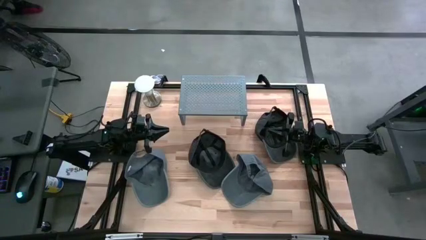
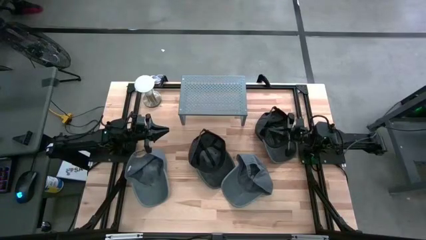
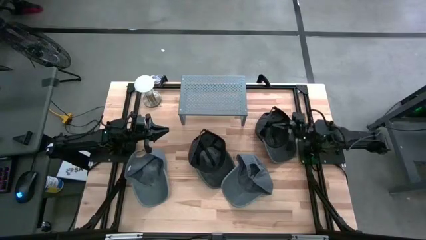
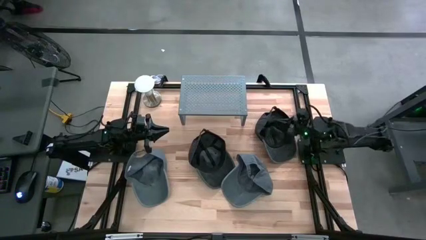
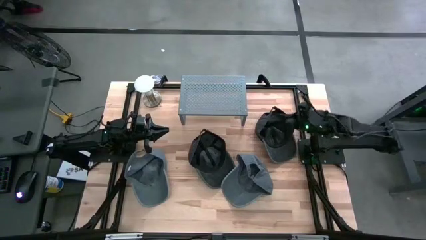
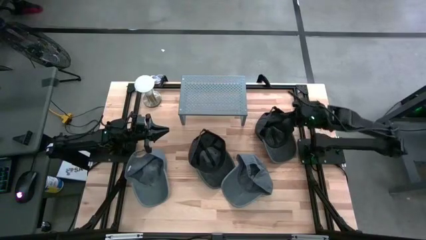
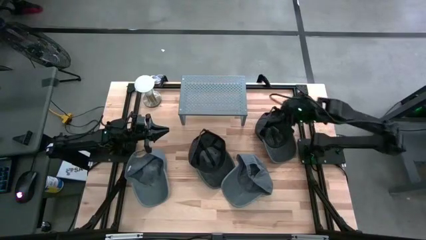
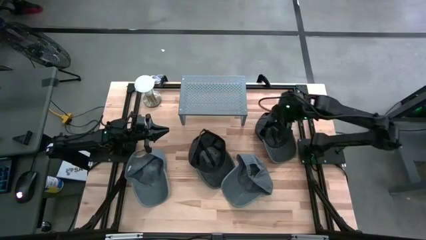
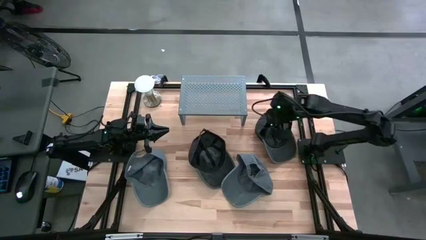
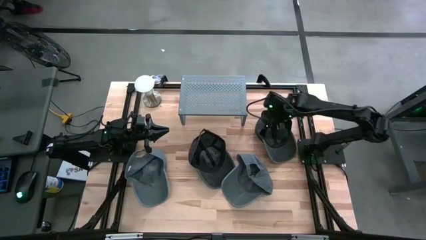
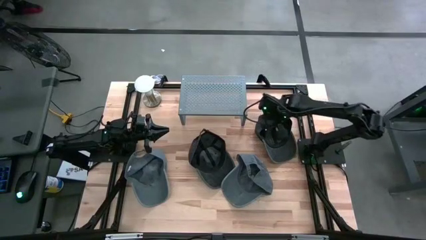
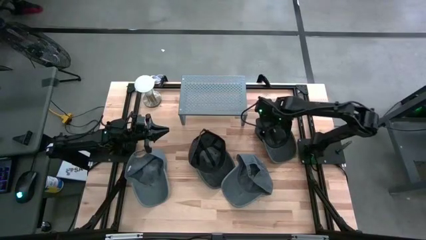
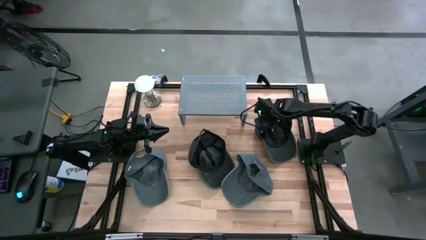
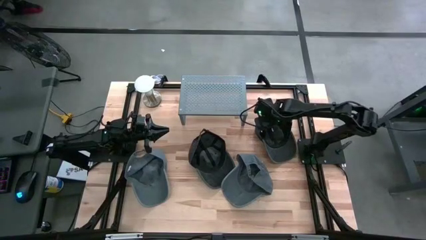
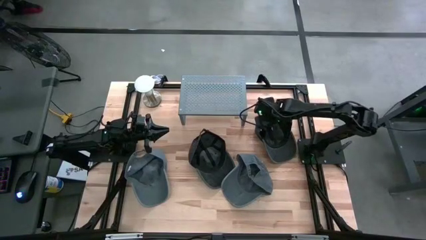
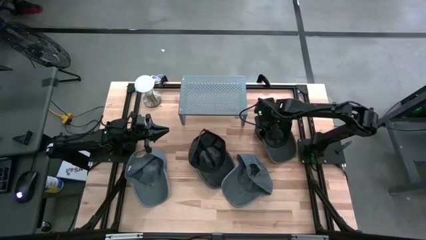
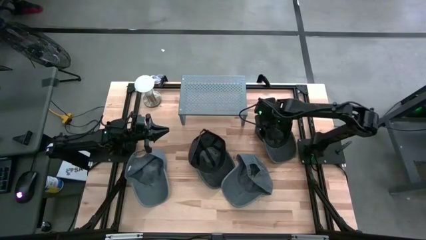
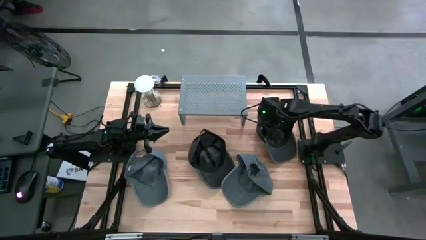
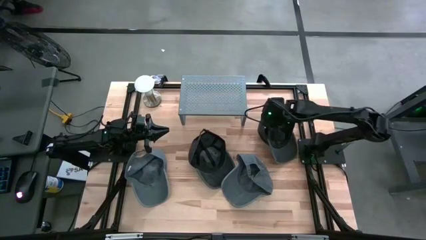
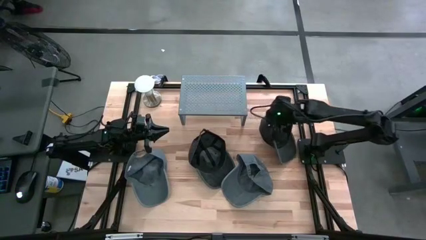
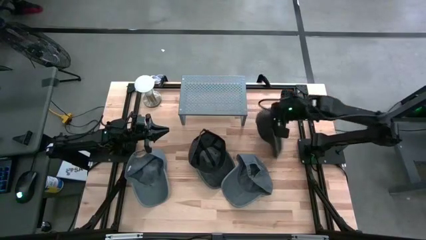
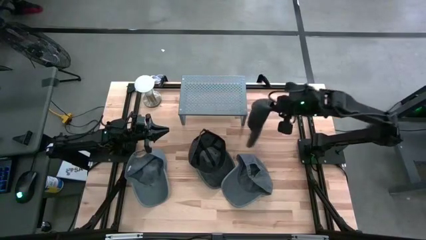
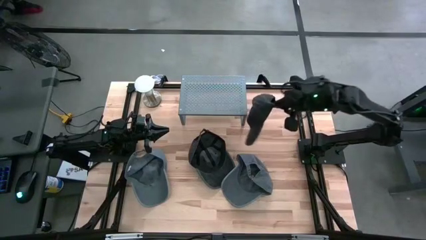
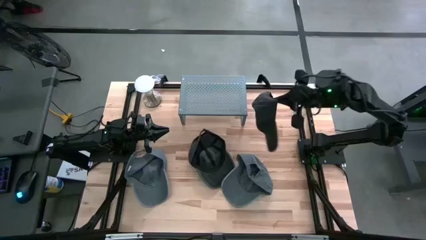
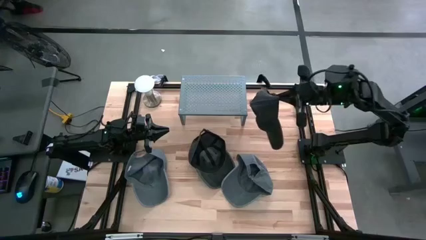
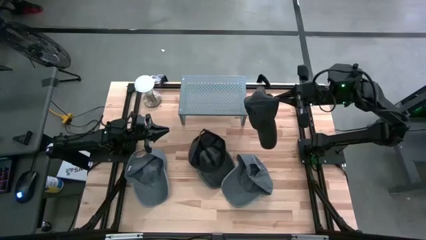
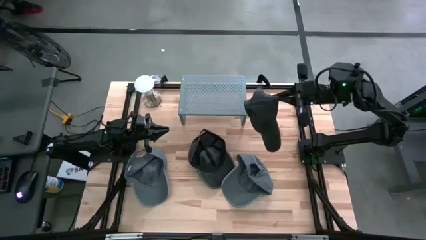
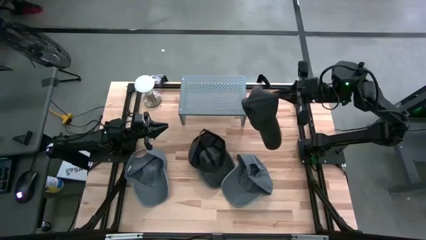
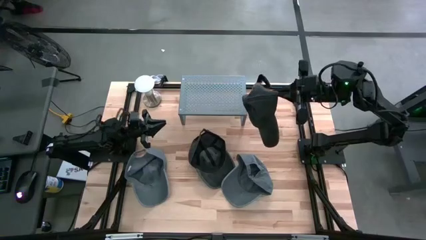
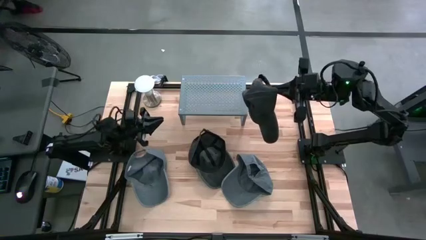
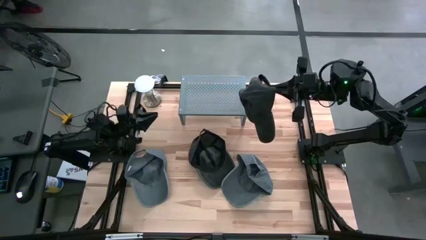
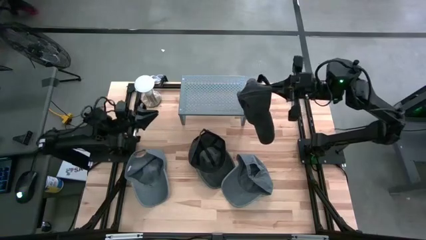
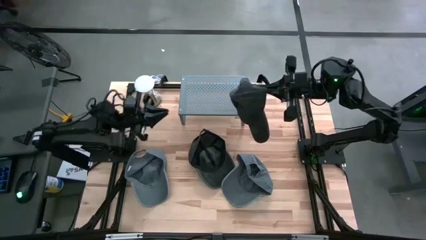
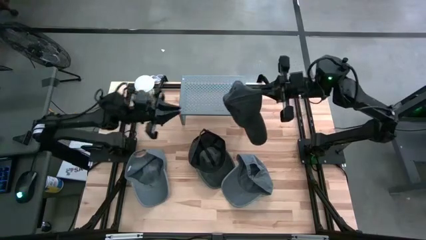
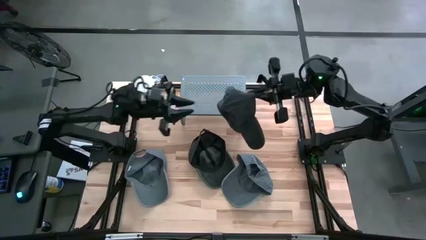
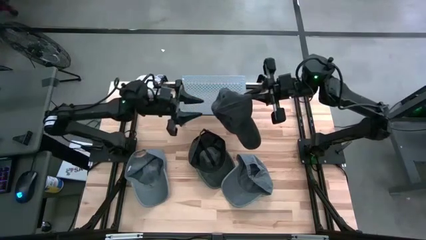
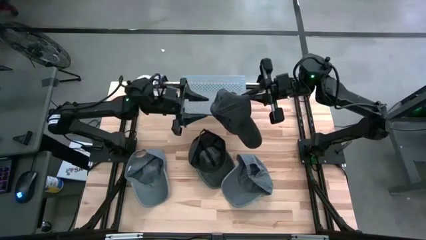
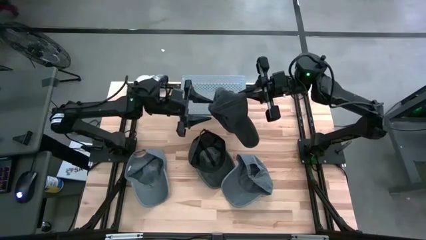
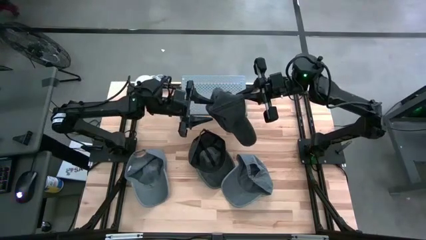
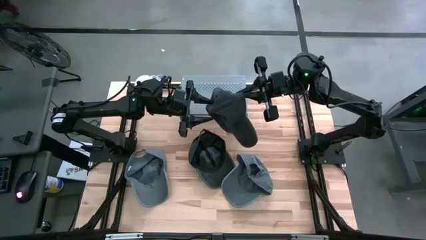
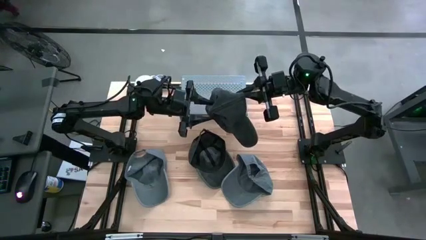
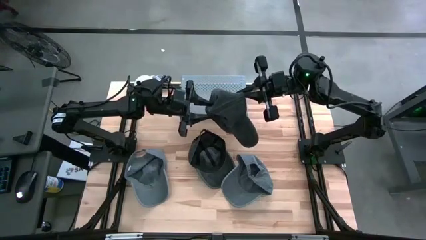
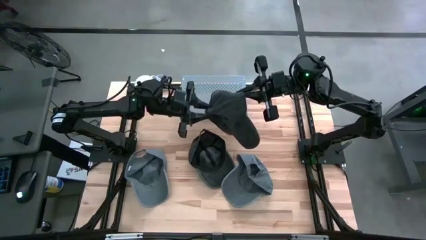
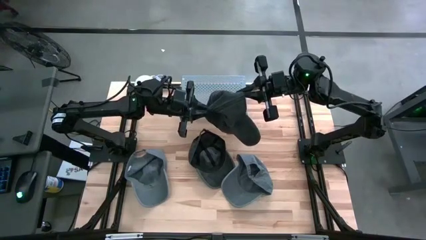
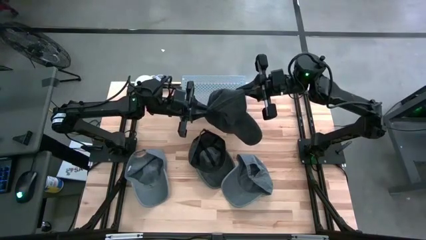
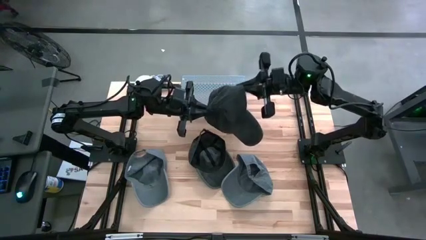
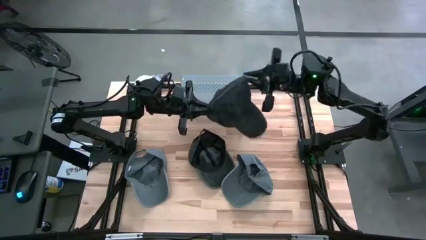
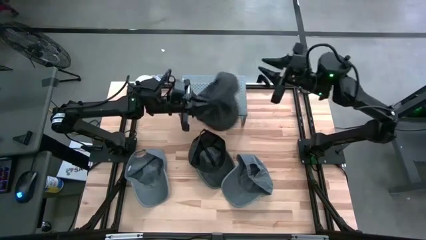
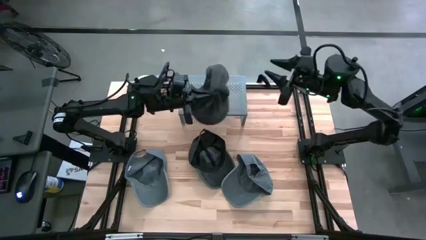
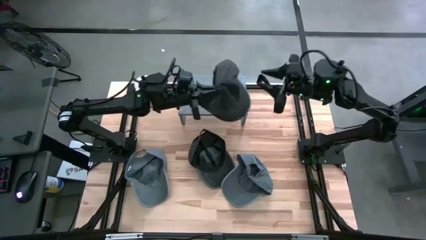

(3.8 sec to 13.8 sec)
Task: Pick & Place hat
Put the right black cap on the shelf
